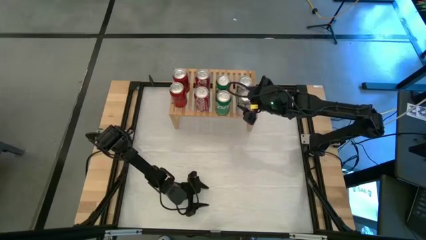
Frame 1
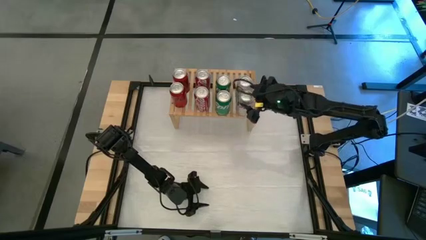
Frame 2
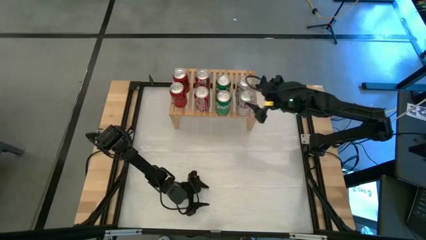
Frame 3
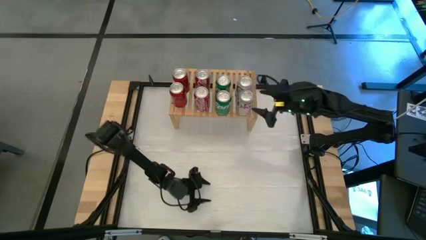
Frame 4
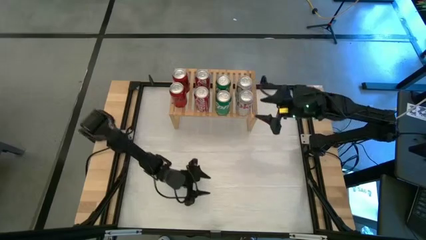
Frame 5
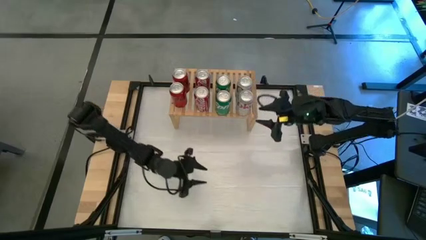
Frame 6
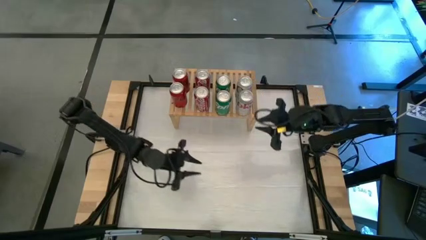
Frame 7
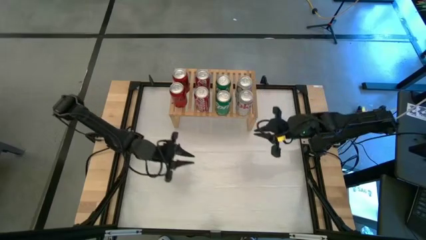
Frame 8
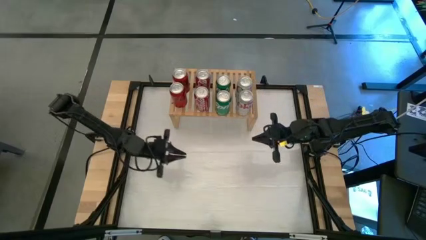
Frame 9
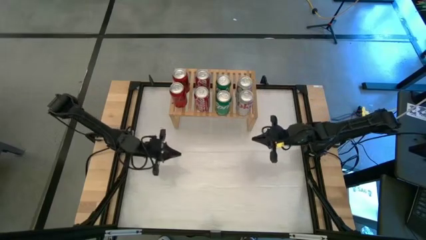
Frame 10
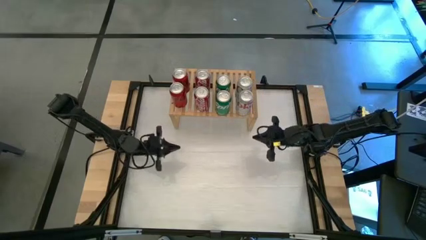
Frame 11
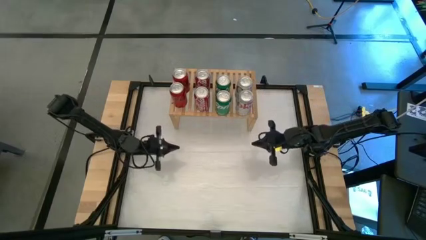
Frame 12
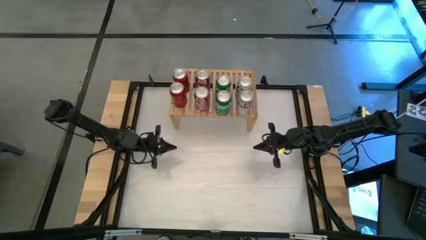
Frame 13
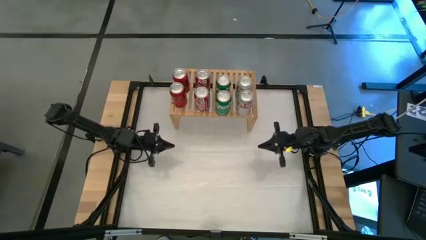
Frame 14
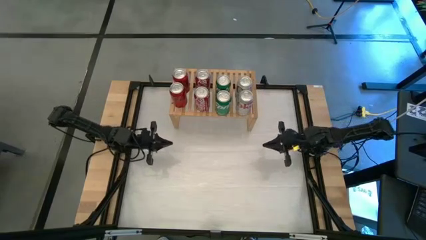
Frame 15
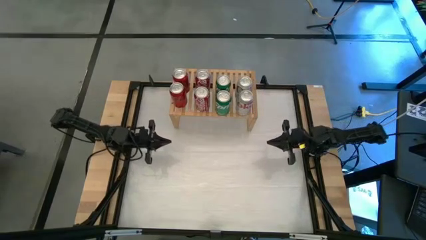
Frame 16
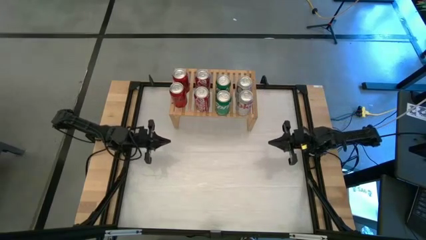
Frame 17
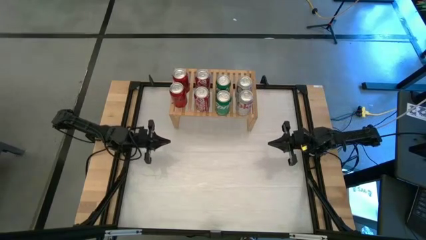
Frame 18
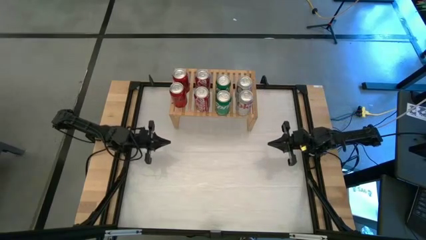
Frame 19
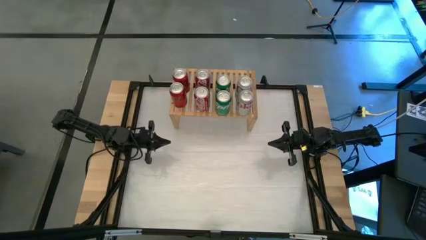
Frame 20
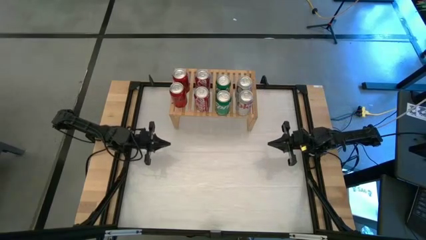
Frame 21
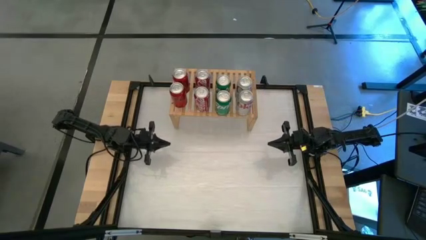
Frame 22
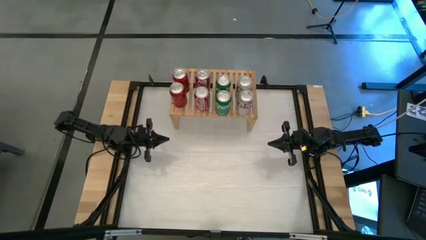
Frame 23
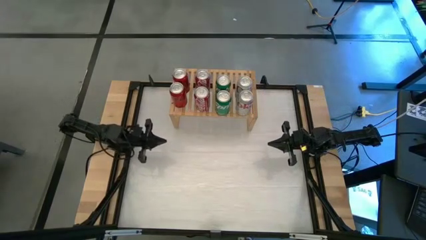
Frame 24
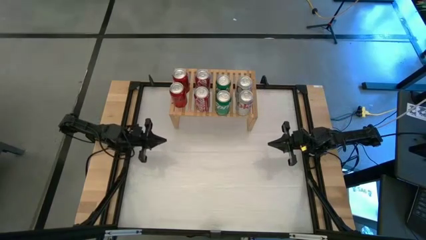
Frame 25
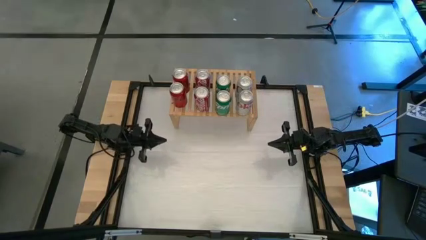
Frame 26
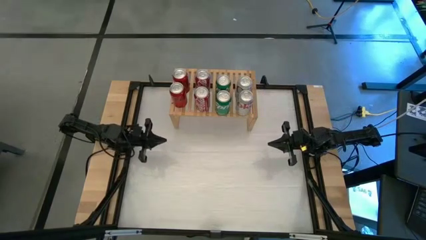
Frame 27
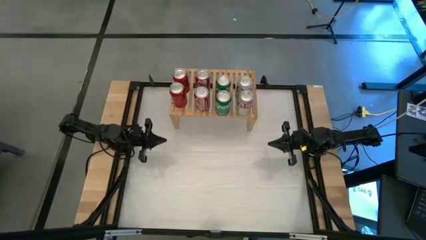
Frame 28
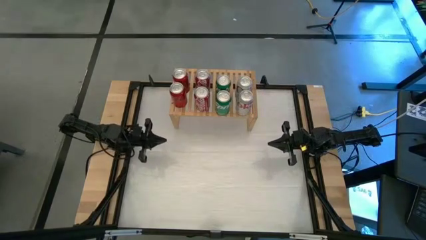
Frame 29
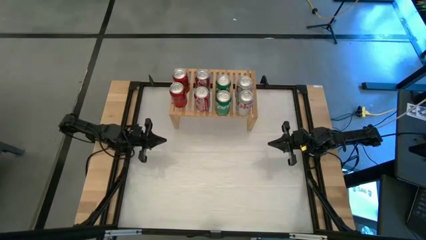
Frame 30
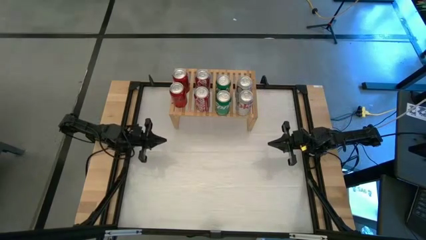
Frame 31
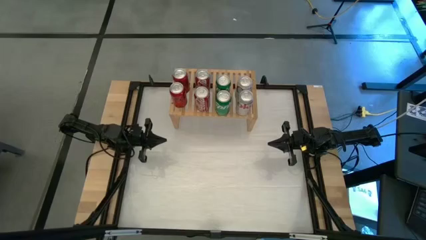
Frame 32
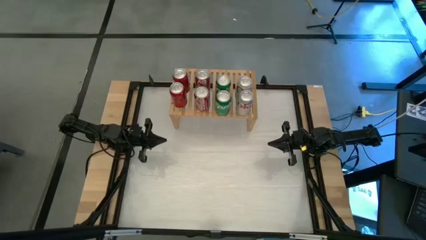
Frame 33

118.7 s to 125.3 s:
Task: Place canned beverage on shelf
Return to Home Position

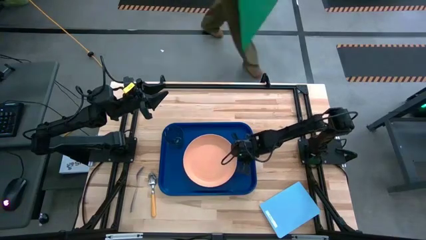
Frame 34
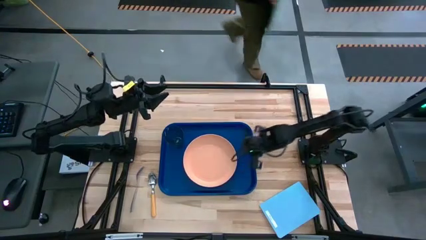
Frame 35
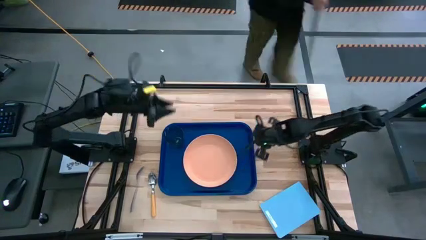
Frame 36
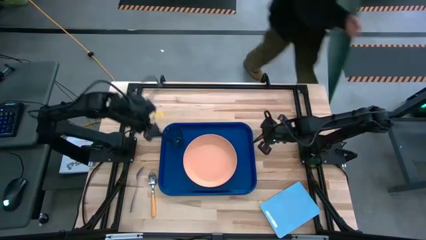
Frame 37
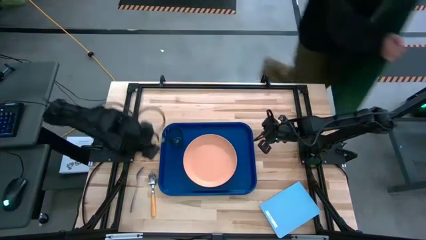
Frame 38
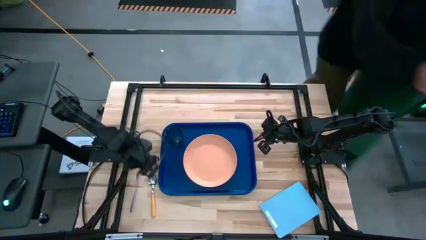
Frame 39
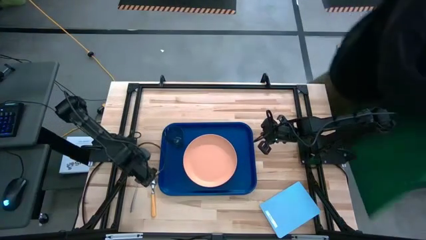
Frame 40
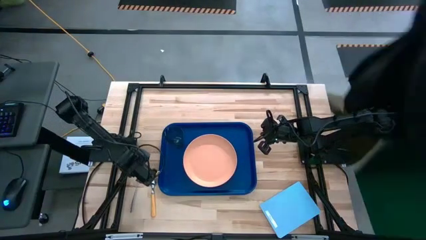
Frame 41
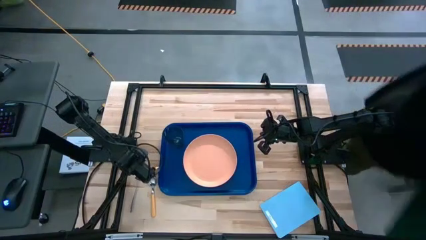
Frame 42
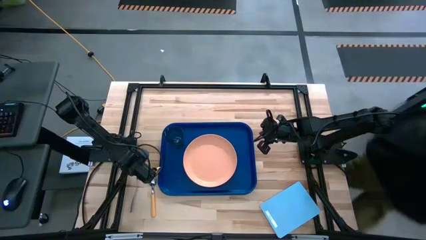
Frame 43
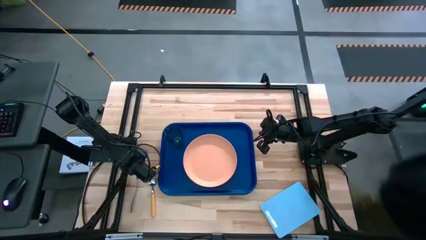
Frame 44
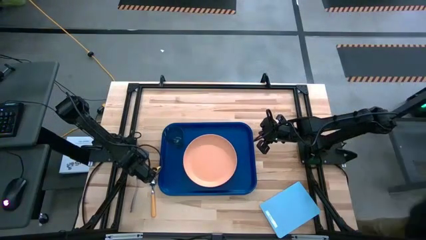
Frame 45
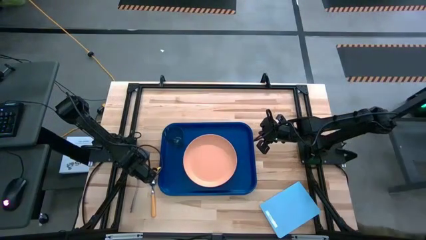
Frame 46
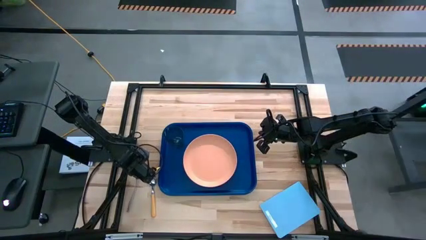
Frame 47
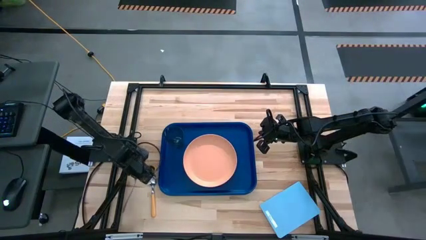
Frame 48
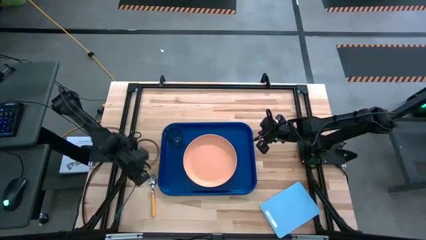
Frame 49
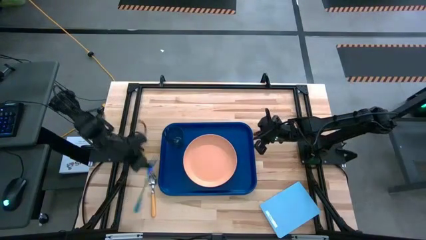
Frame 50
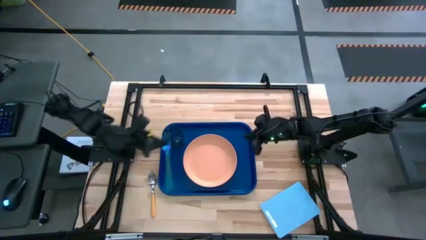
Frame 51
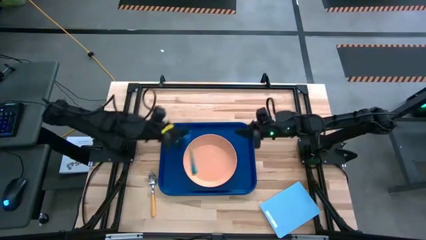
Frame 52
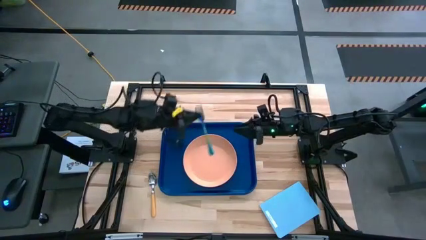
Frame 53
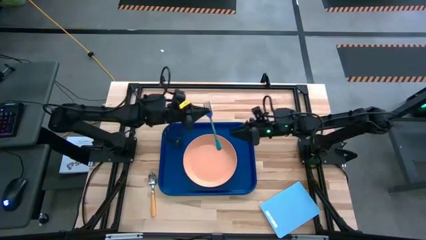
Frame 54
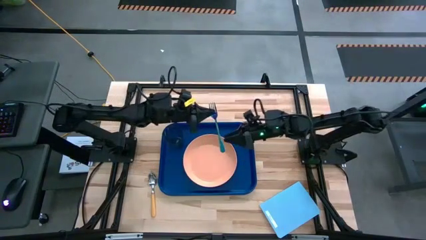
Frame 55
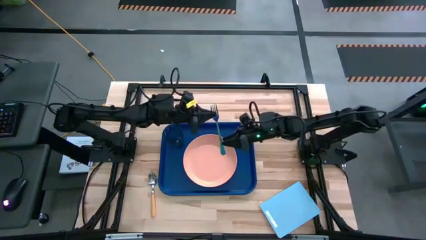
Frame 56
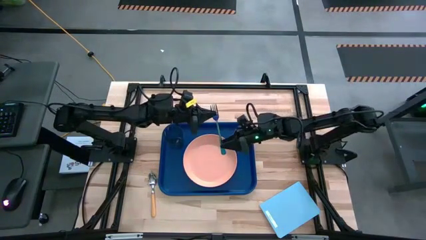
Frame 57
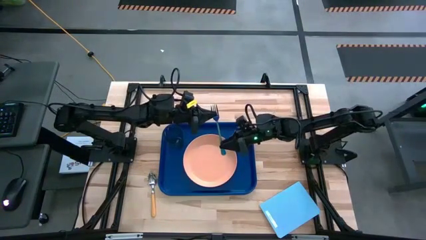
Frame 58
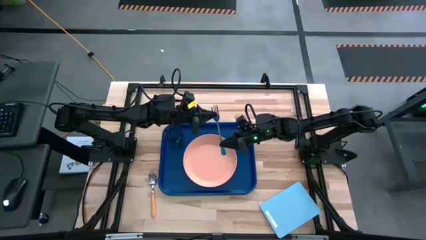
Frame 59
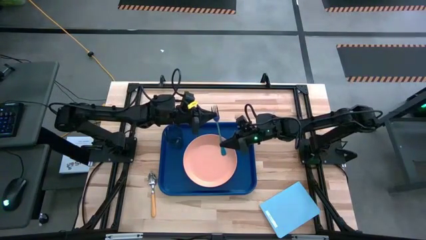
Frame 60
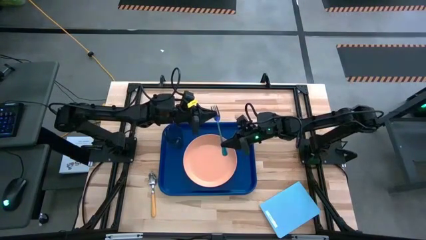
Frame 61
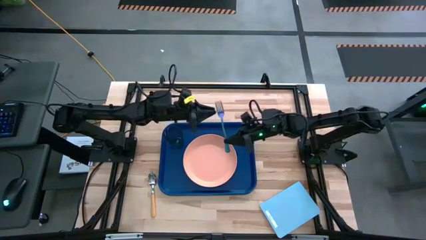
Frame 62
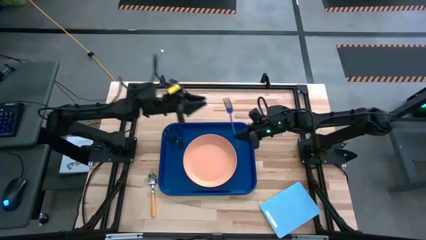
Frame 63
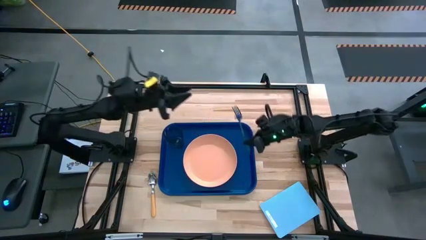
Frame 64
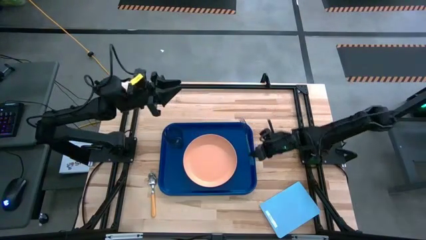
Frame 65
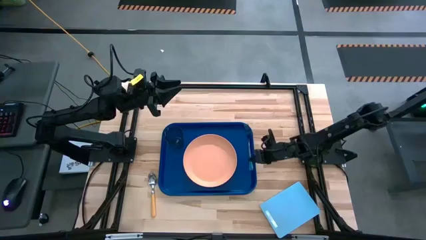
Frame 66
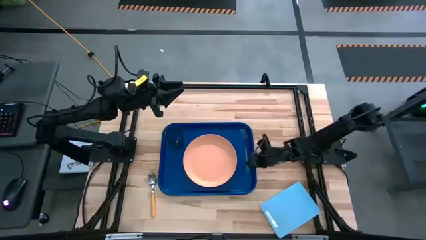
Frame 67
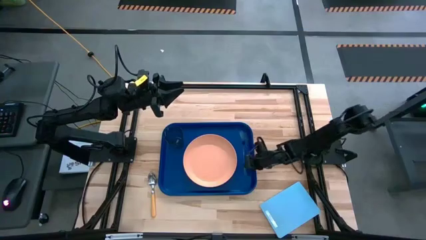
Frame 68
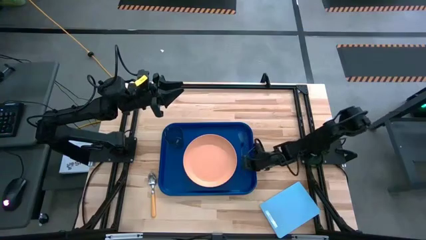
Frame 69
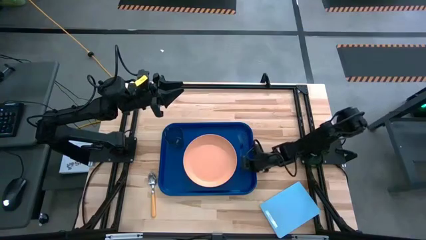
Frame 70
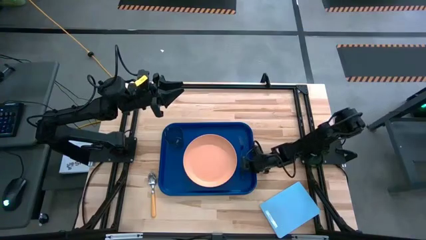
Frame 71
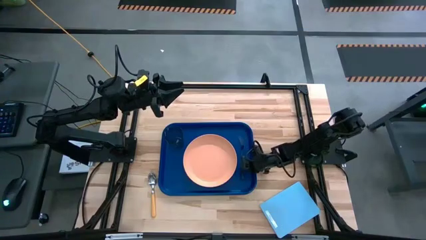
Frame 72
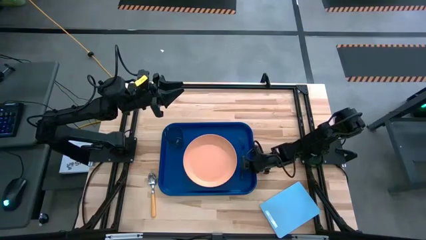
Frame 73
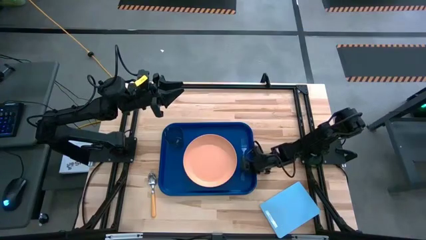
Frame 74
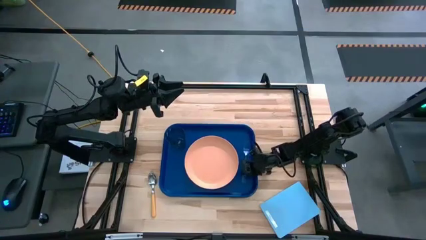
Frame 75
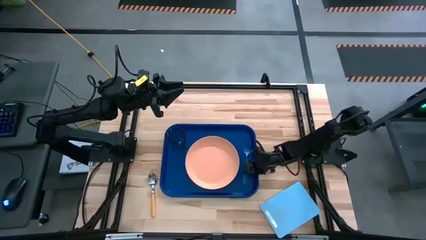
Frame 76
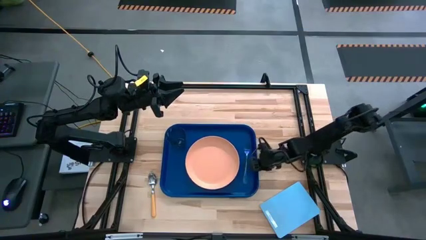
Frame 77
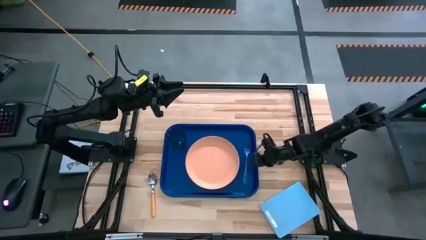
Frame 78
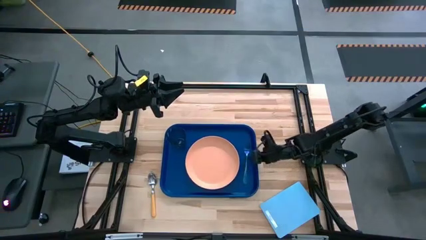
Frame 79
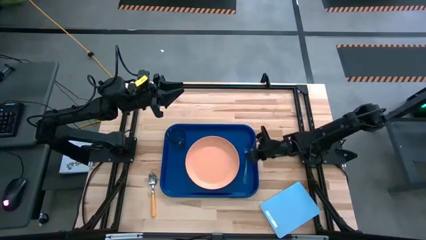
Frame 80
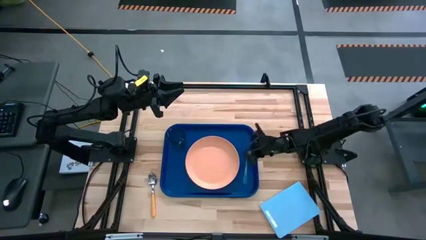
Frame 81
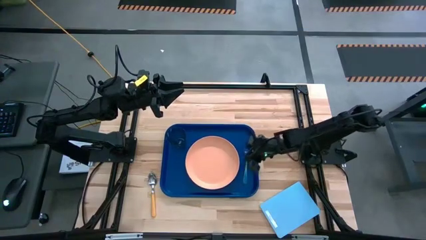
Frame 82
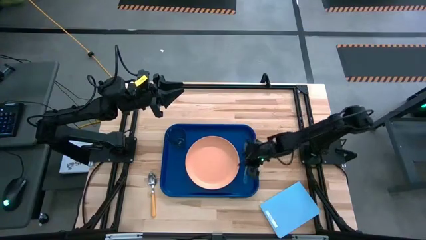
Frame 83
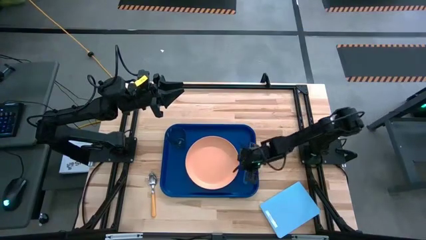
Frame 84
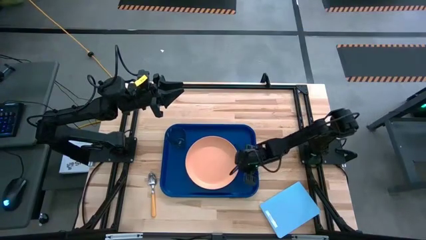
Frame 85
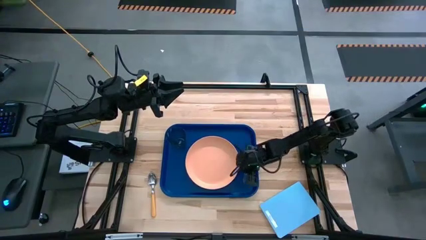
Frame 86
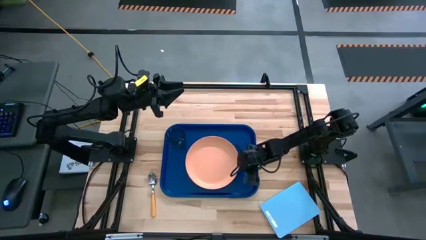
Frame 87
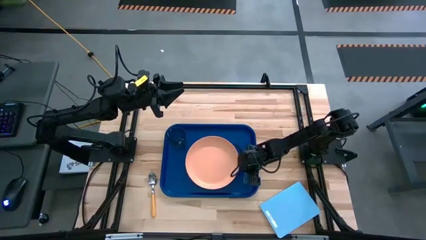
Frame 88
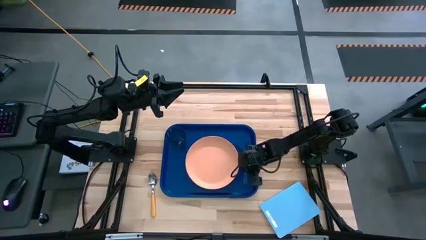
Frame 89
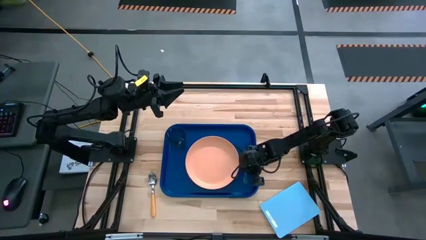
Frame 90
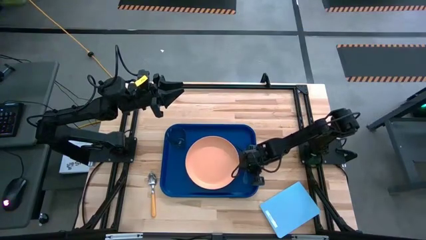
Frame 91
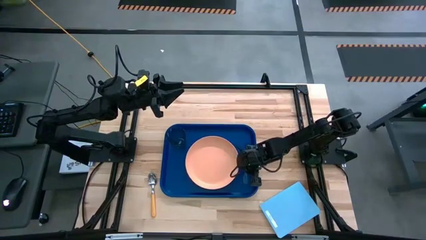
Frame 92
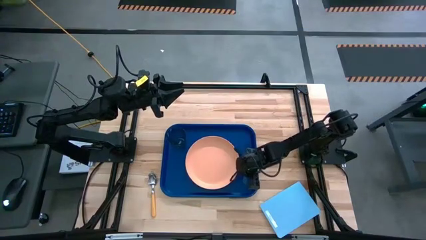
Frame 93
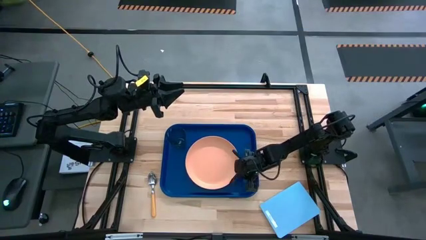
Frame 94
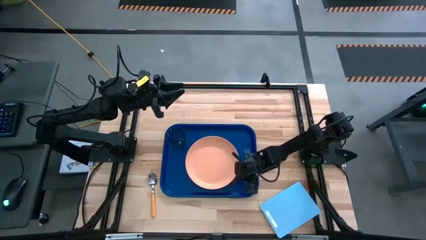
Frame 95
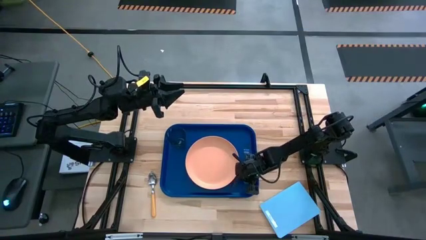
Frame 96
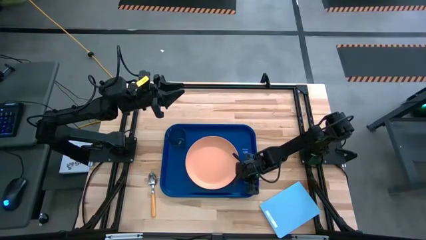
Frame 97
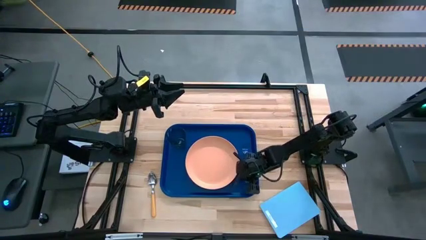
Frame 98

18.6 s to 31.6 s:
Task: Pick and place plate/cup/fork/spoon on tray
Put the blue fork on the blue serving tray to the right of the orange plate
